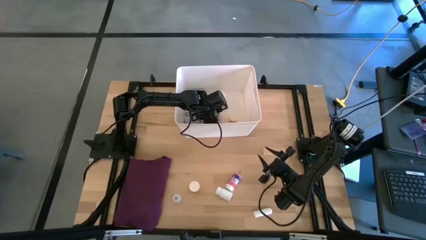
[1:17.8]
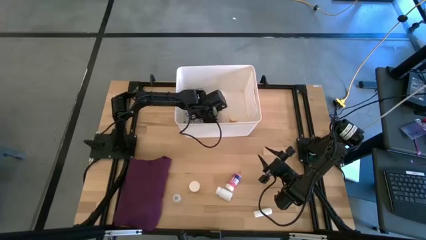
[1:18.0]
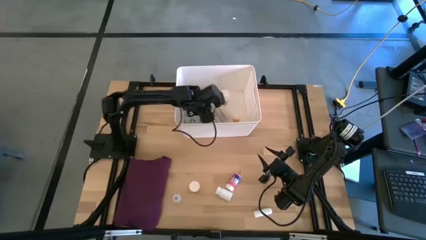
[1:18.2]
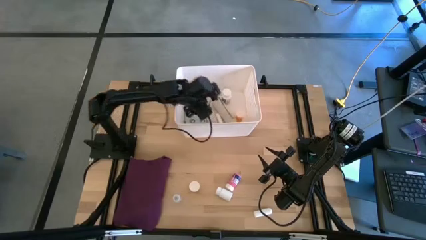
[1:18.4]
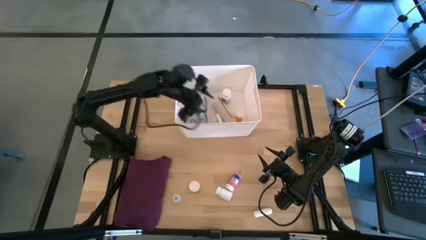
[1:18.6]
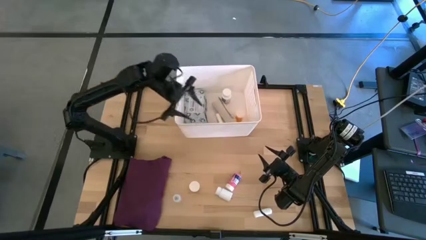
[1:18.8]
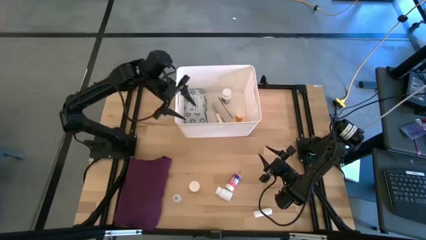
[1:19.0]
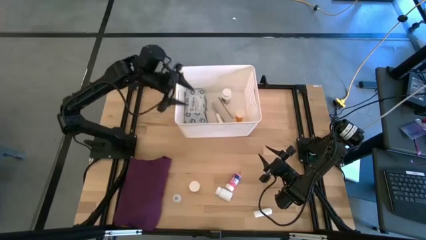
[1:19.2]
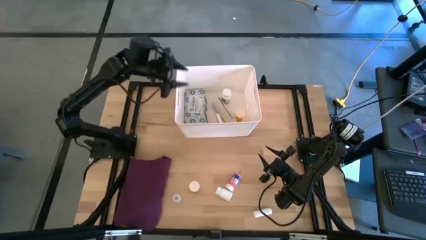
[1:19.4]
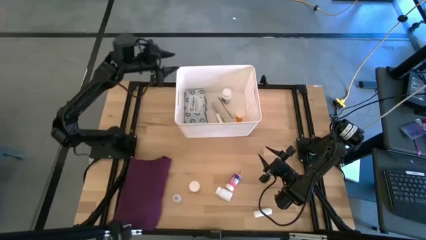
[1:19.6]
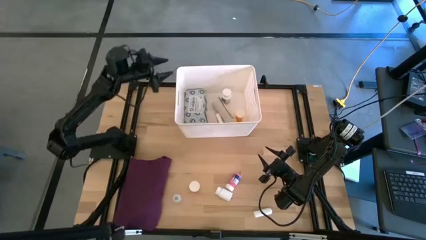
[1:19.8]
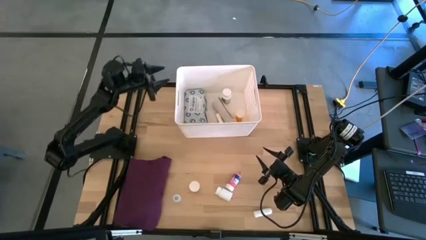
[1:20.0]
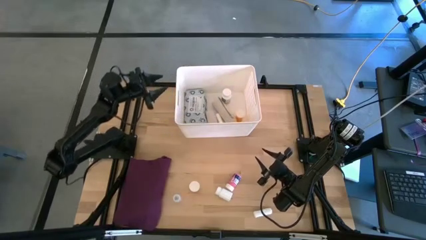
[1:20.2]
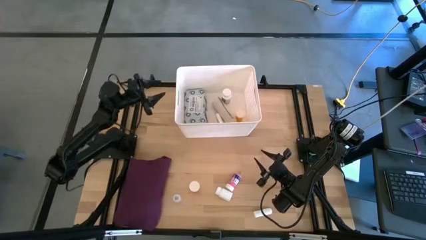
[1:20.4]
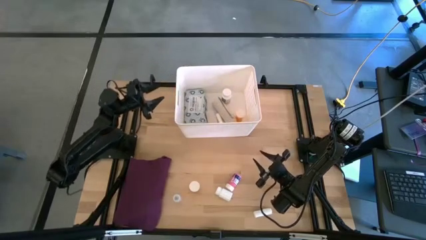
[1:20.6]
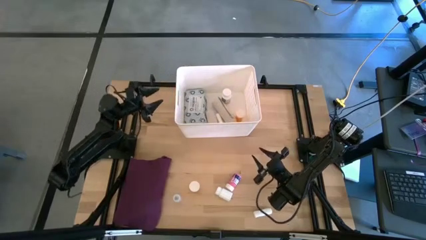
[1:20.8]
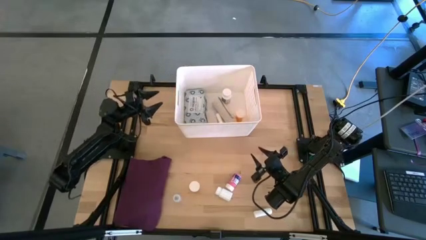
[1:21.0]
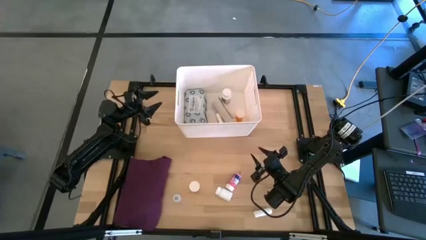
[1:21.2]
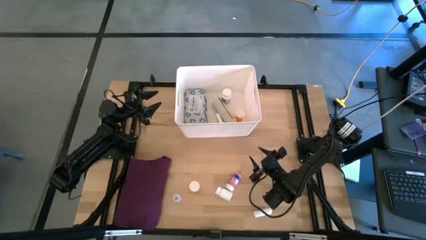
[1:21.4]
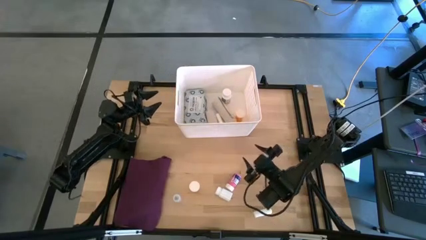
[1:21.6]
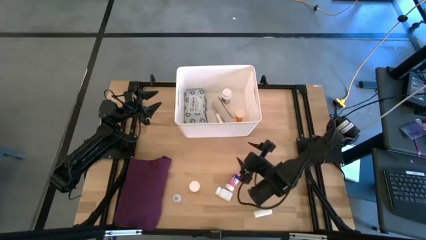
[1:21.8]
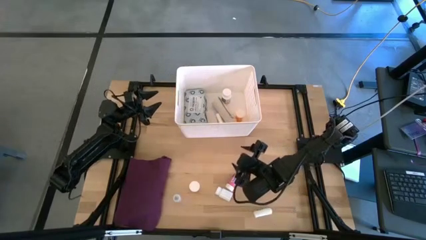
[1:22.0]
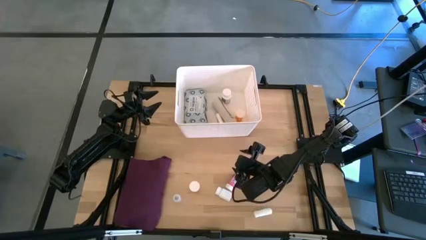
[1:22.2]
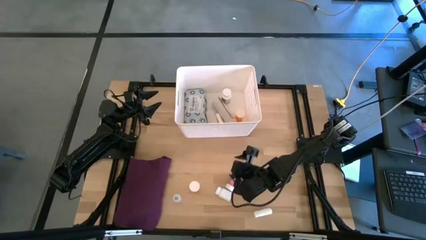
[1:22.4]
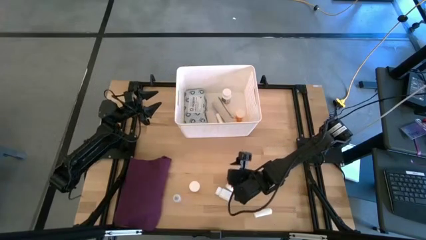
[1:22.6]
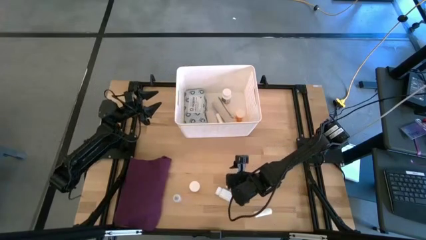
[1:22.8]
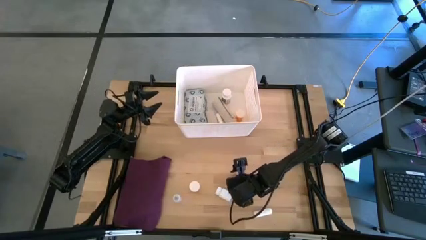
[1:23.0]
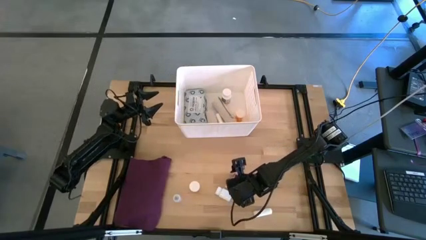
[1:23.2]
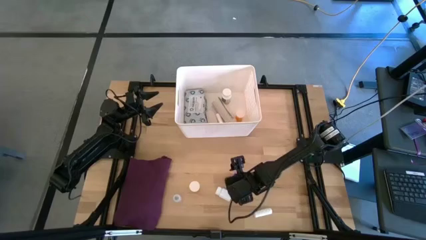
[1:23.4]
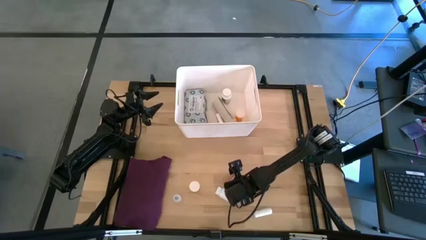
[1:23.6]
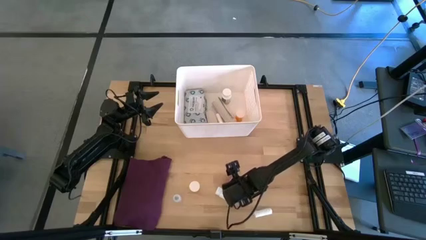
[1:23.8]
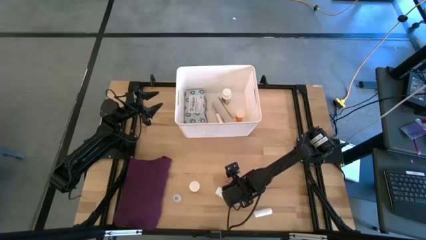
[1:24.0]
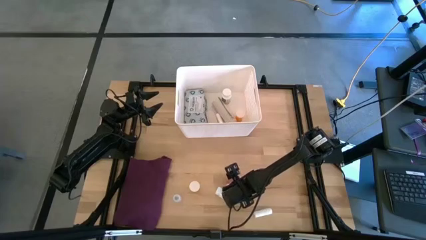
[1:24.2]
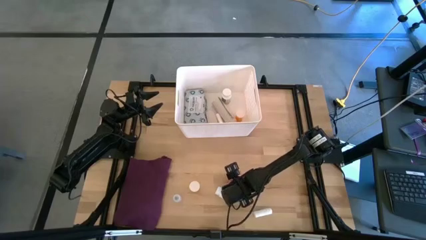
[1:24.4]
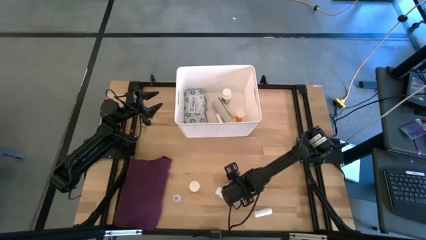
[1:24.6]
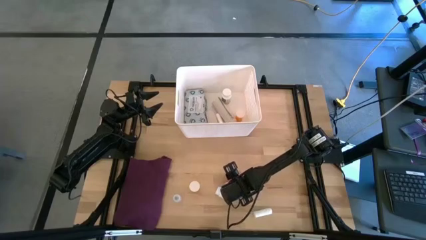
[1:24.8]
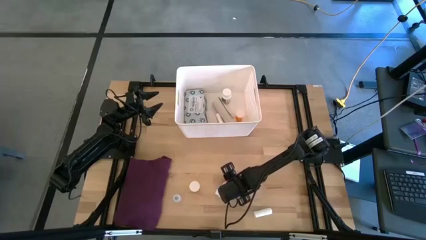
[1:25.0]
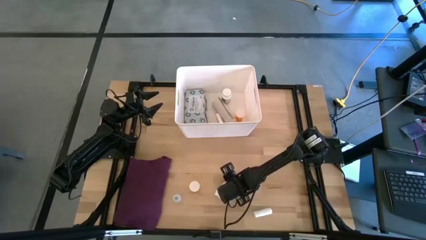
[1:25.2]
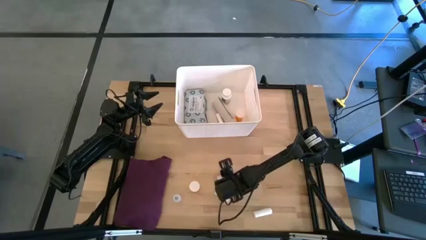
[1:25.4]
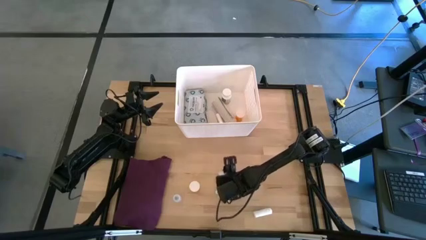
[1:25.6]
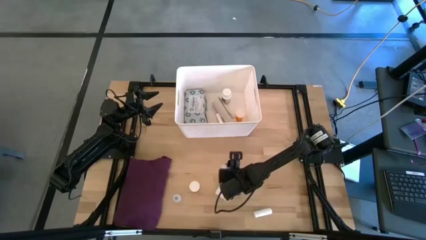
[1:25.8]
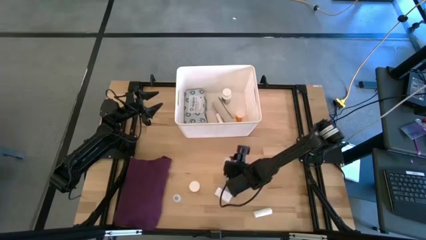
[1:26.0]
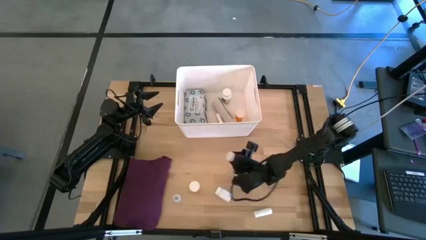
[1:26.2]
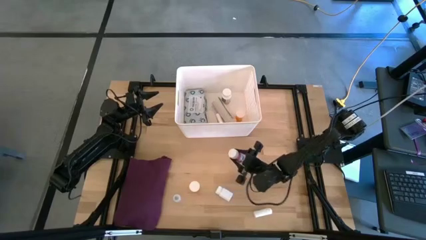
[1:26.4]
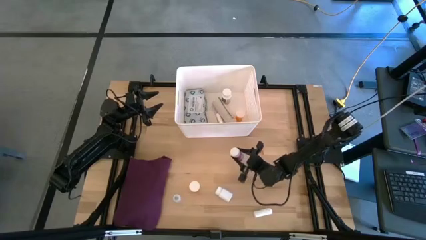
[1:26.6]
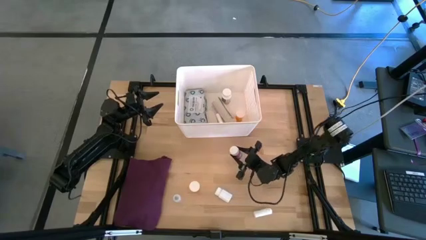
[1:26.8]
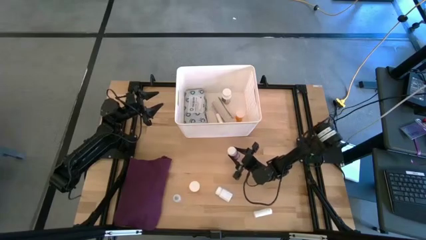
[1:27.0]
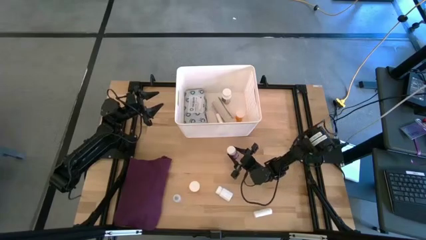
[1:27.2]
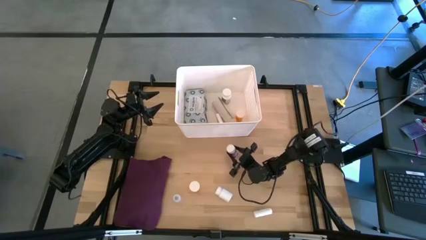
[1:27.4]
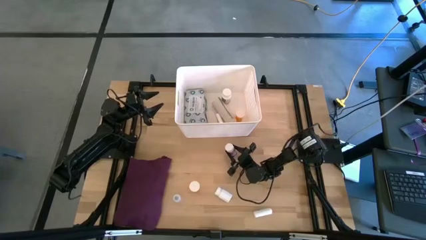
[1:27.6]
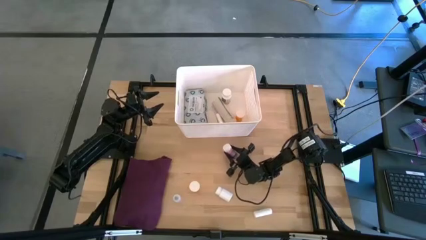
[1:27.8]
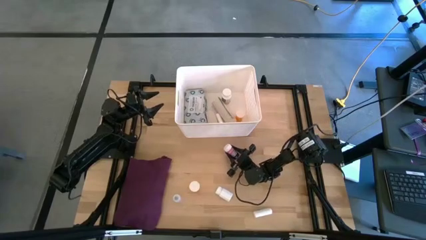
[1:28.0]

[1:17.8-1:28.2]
Task: Pick & place medical supplies in basket/bin
Put the pink pill bottle into the white bin

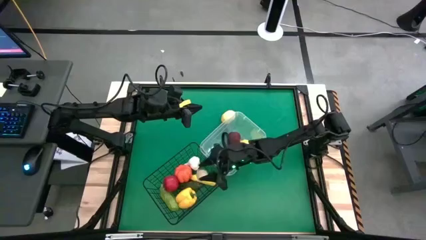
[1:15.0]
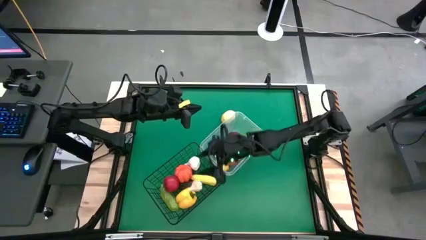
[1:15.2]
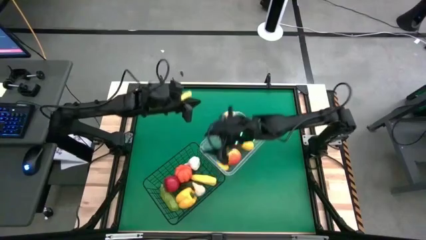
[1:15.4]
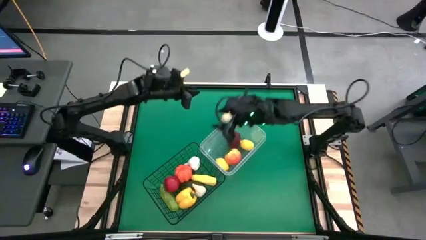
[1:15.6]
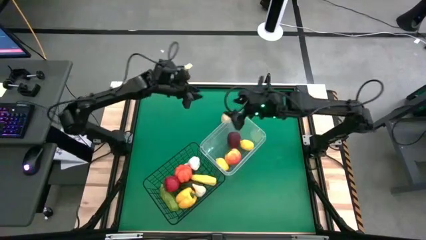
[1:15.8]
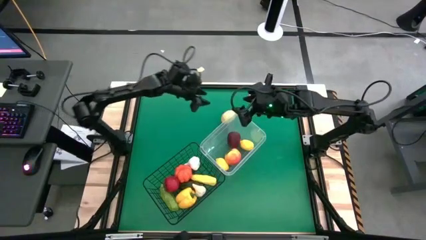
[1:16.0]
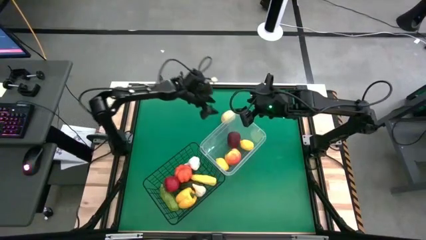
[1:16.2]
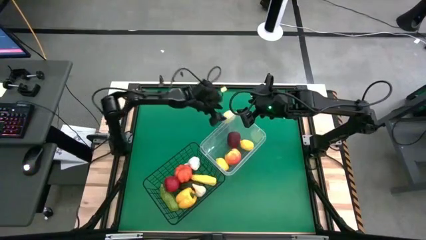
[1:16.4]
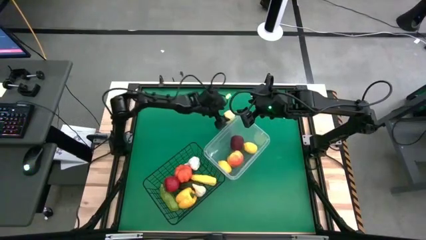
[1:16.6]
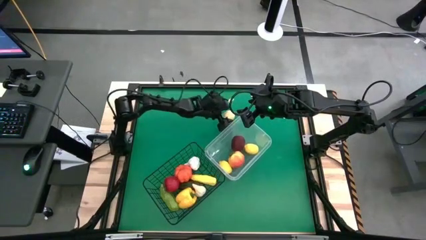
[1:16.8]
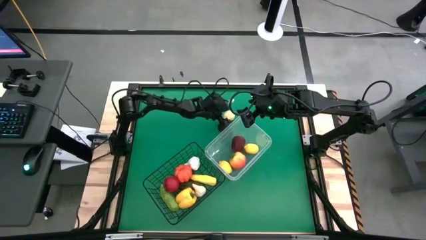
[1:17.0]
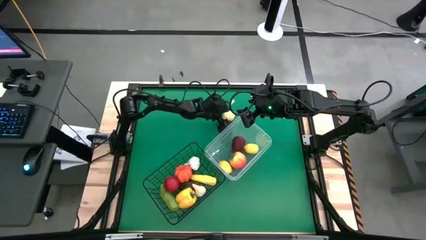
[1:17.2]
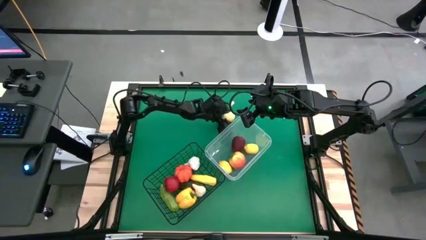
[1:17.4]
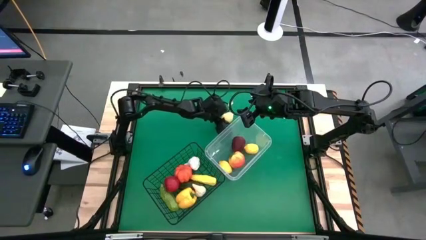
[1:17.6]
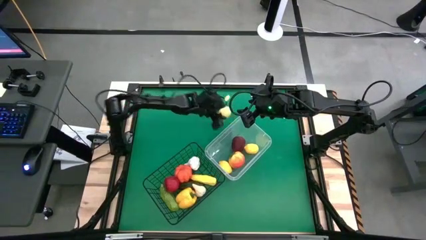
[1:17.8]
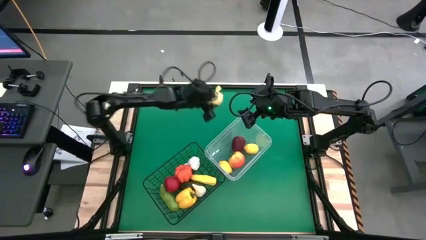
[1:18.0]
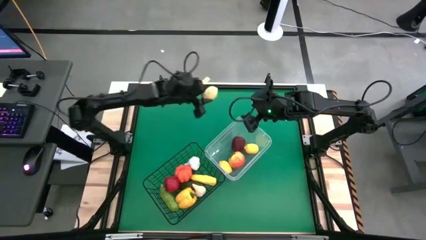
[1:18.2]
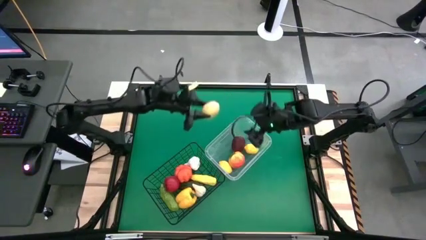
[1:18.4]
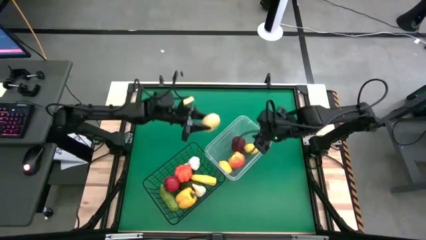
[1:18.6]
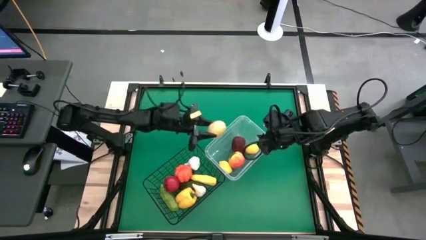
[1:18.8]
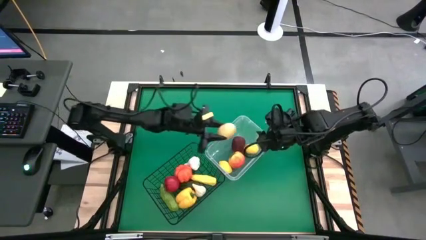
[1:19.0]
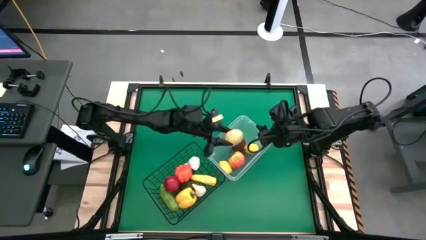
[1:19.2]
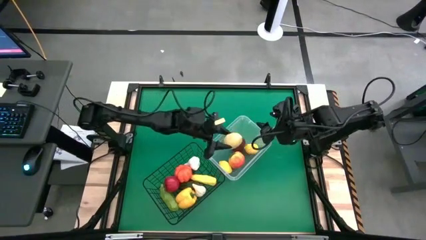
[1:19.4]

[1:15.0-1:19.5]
Task: Sort produce into baskets
Put the lemon into the transparent bin

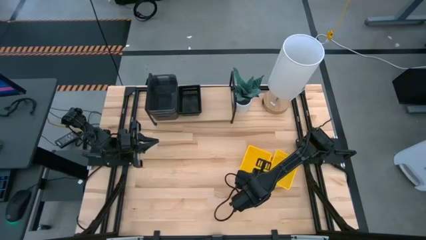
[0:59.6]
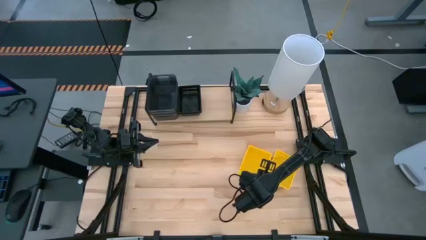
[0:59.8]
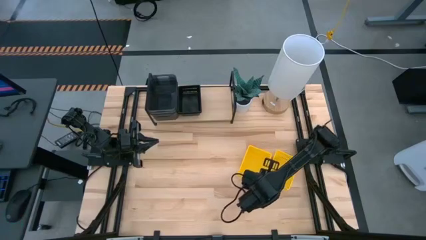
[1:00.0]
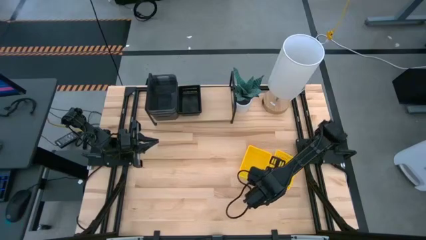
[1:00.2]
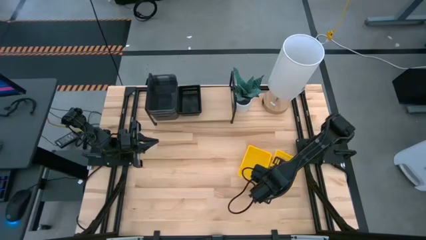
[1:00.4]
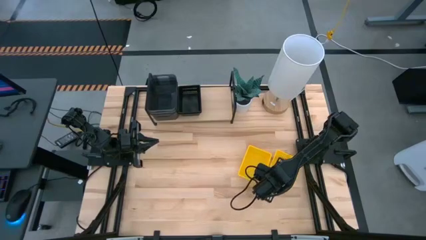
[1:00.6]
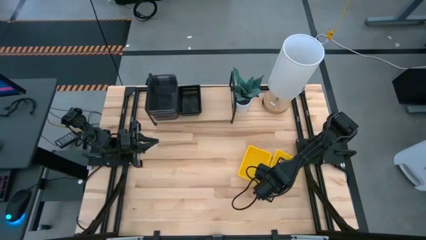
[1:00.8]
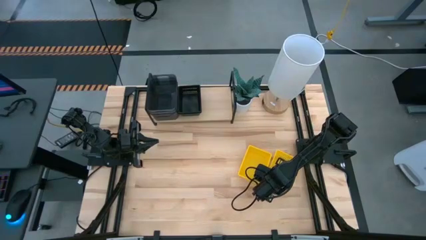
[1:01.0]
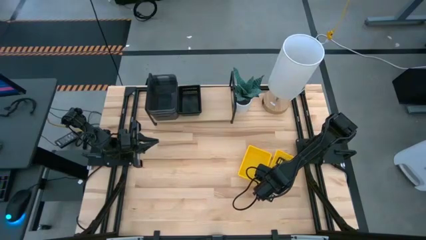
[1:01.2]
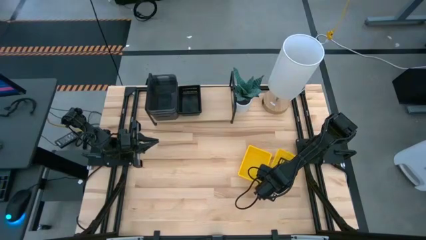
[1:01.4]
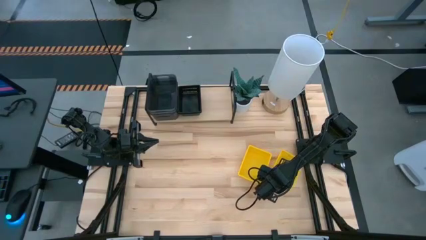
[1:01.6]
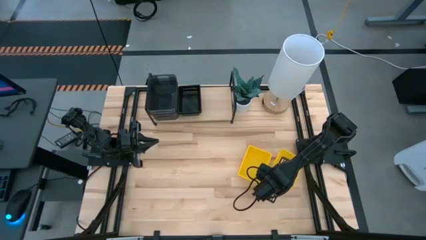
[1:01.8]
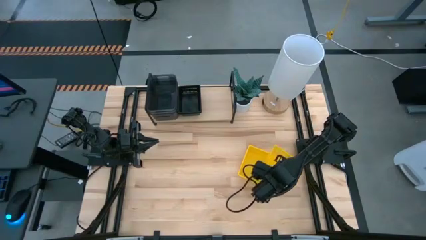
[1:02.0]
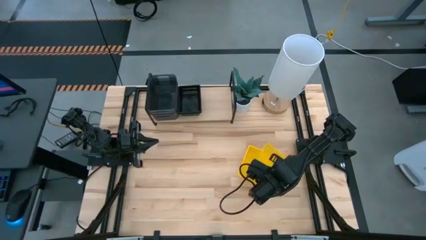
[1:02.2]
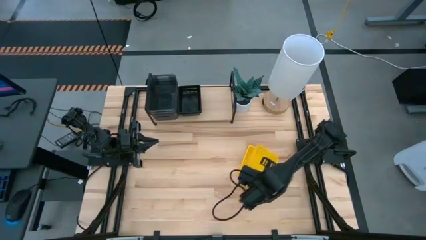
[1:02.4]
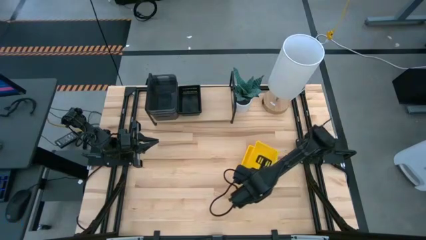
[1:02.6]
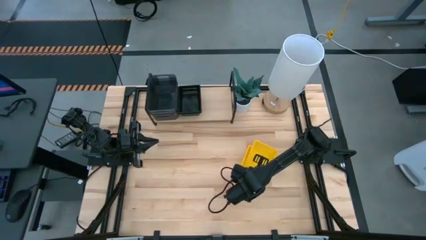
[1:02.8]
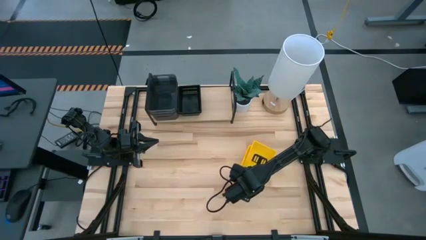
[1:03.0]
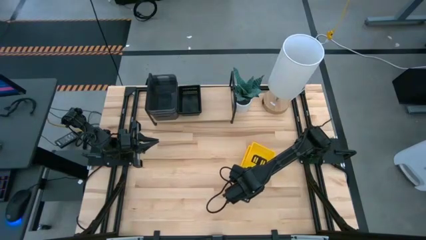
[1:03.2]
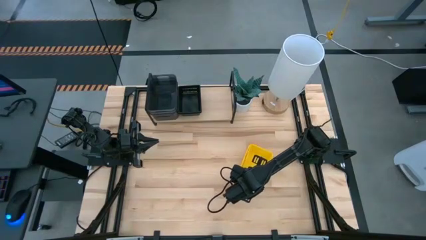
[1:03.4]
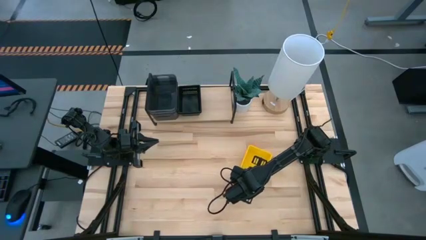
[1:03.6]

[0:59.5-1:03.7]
Task: Stack baskets on shelf by color
Stack the yellow basket on top of the stacked yellow basket
